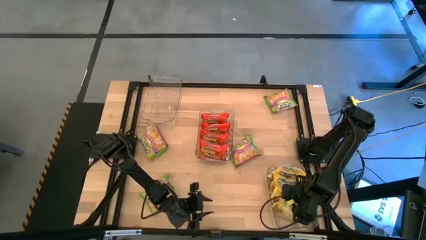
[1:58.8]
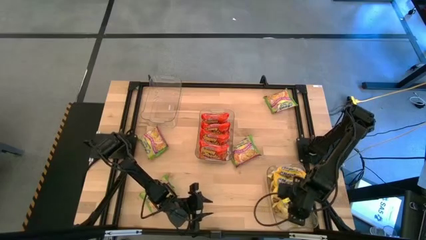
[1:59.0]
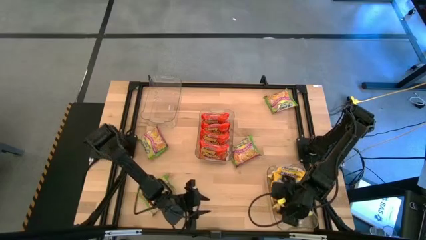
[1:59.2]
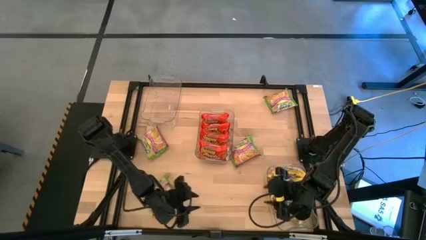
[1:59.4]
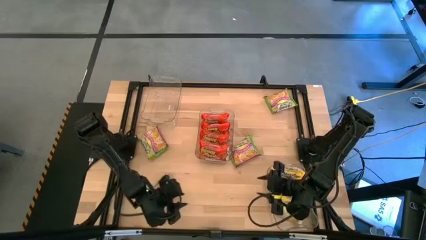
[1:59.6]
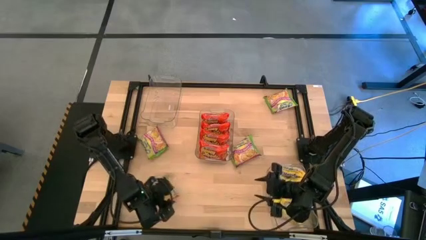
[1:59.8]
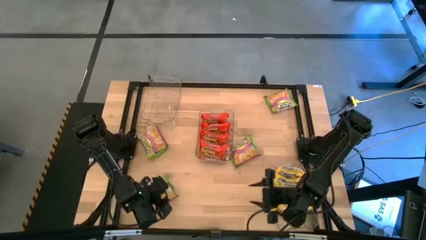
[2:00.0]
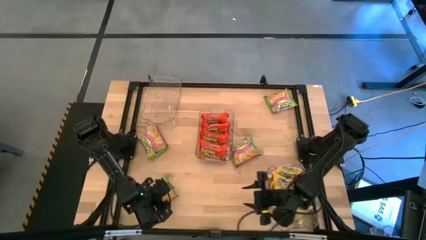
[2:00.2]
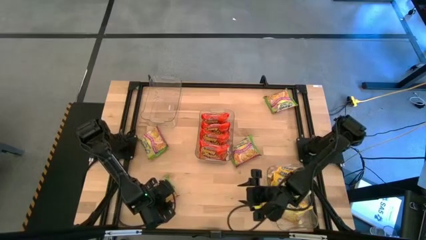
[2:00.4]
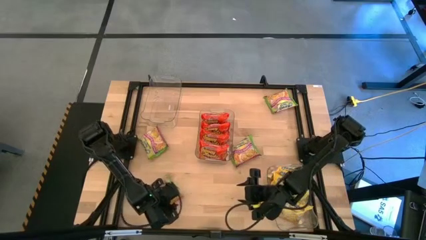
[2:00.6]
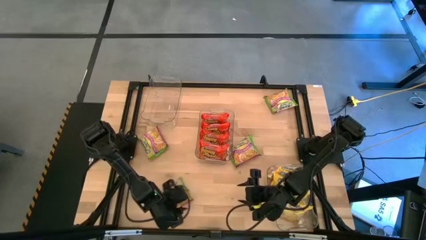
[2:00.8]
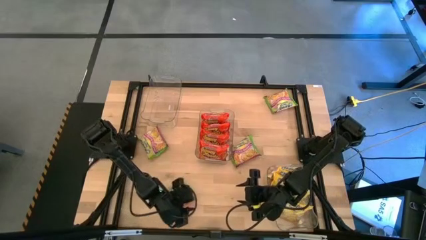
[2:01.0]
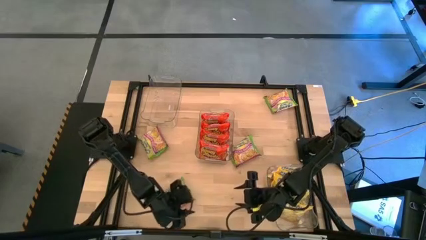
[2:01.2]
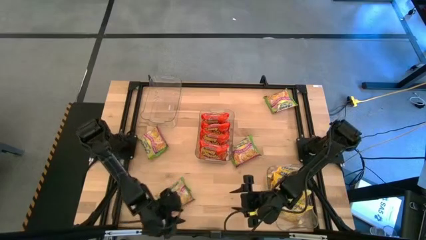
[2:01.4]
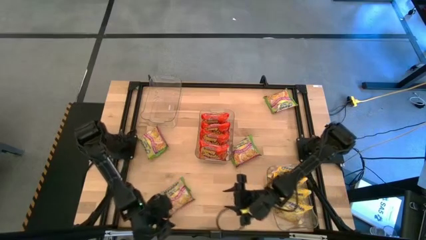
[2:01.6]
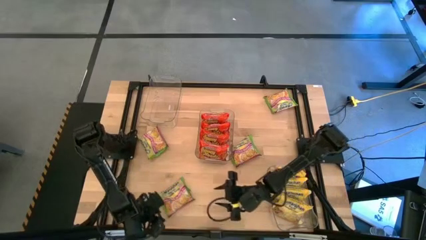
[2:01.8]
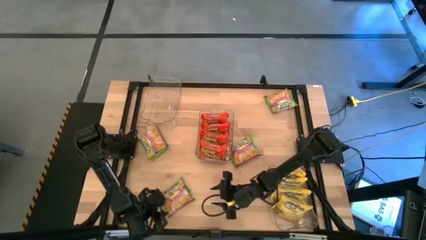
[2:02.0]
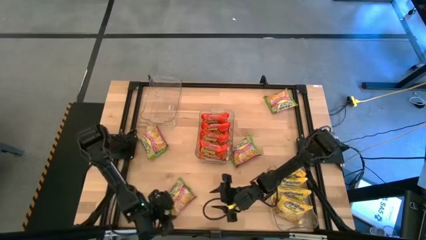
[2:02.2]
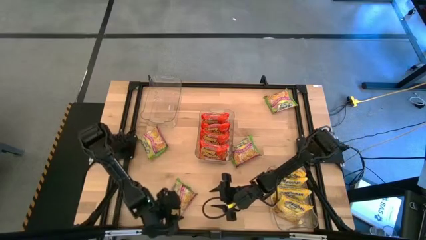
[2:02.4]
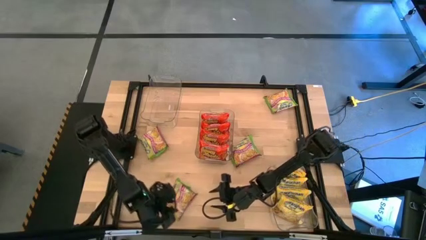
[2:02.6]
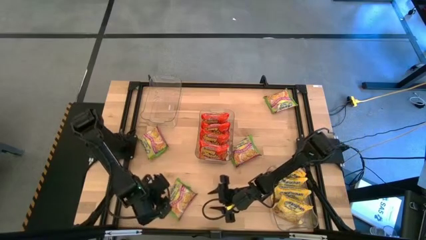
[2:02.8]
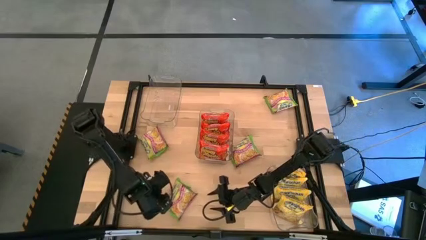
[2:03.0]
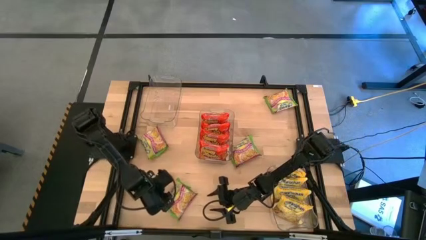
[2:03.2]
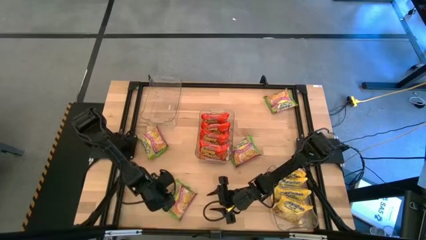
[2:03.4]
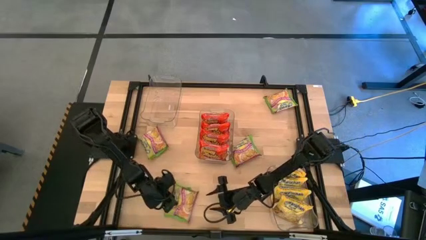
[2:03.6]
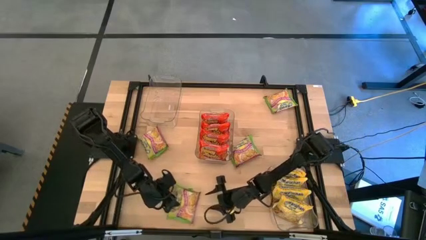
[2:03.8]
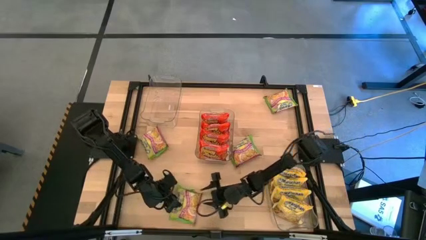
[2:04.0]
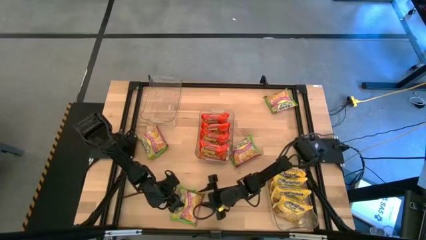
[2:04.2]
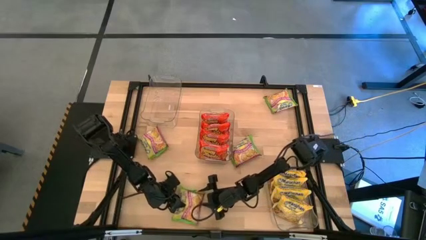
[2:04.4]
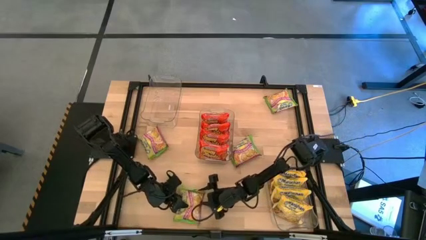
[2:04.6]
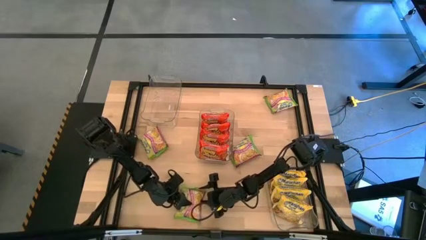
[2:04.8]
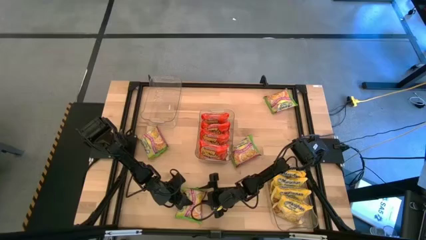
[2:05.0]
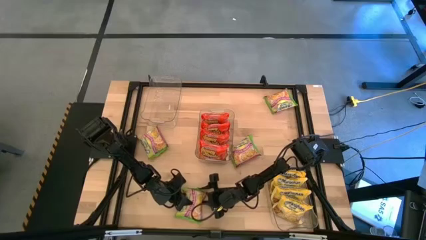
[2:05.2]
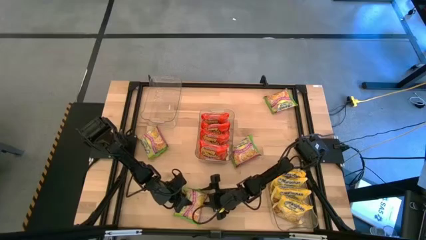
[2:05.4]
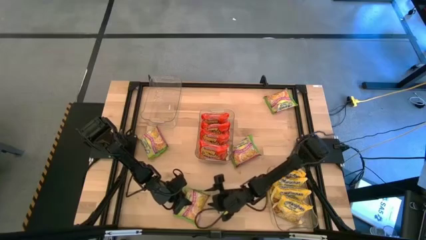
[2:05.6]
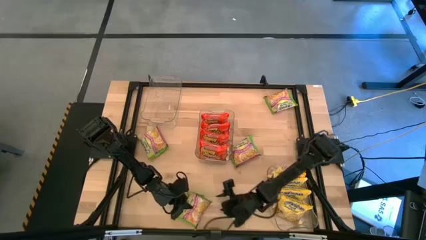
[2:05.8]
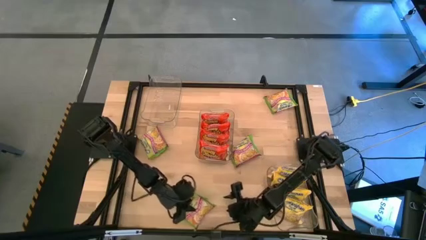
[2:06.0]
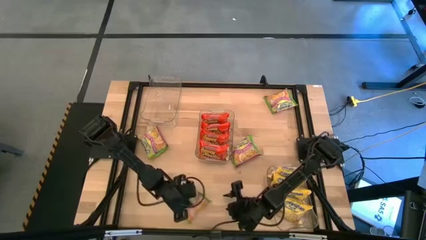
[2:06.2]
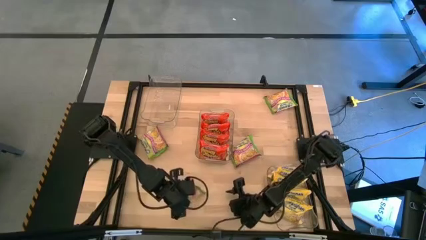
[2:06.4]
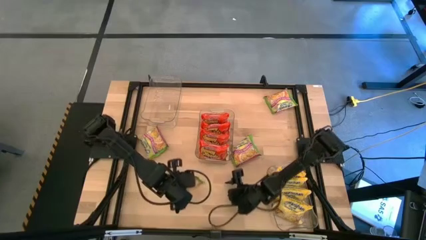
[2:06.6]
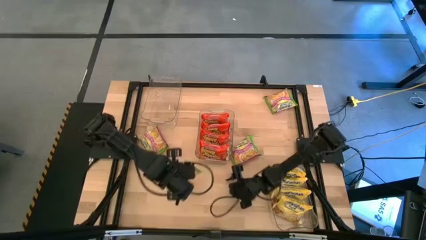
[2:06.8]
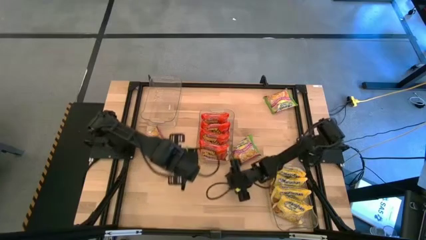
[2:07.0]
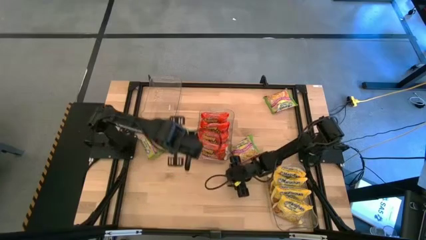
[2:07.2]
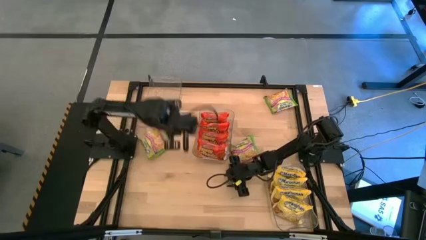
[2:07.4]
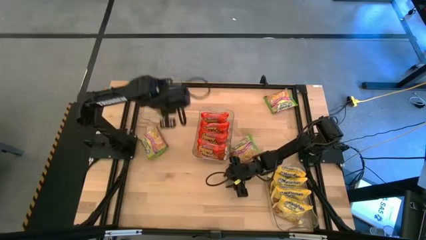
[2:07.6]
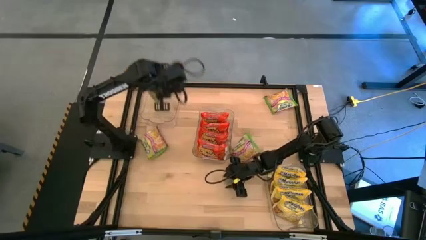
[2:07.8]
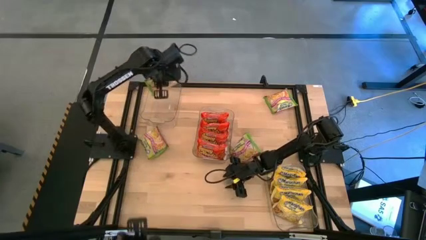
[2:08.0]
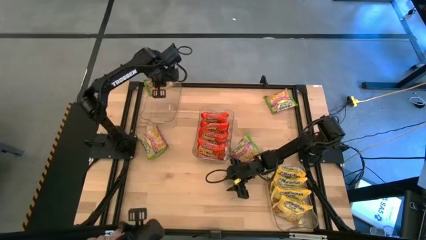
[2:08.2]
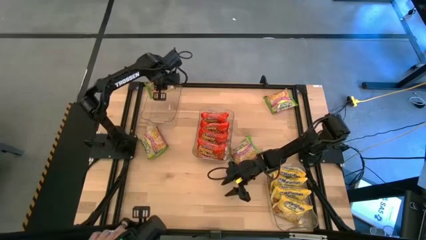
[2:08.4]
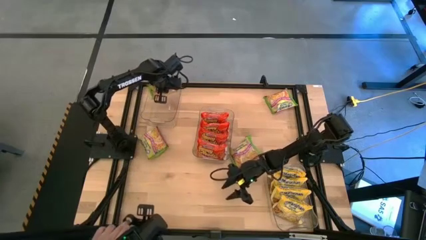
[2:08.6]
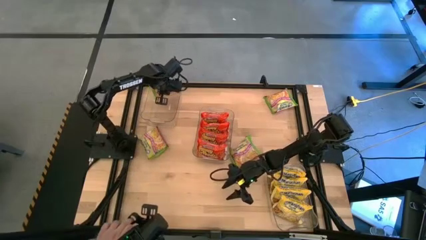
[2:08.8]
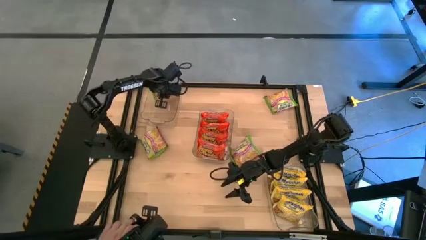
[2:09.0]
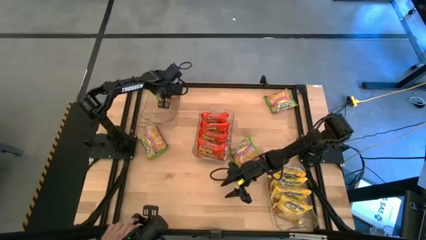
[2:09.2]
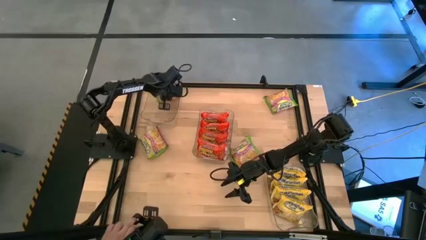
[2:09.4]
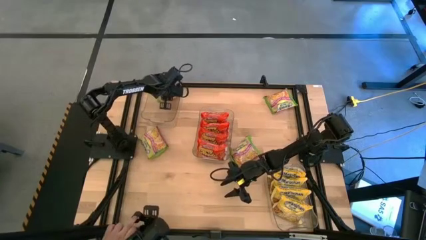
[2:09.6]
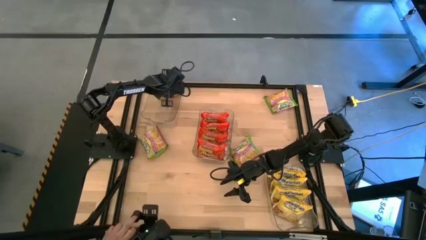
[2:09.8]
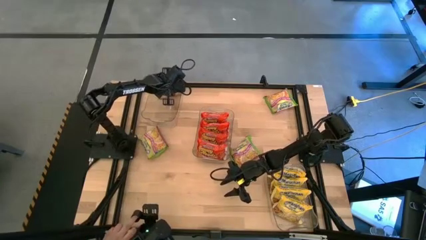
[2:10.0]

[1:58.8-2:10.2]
Task: Sort Maruchan noodles
Put the bottom left green noodle pack into the top transparent bin
